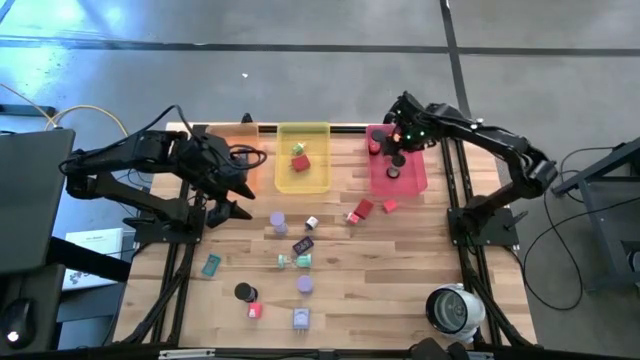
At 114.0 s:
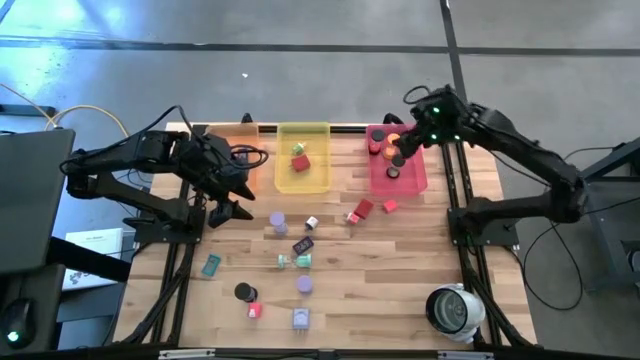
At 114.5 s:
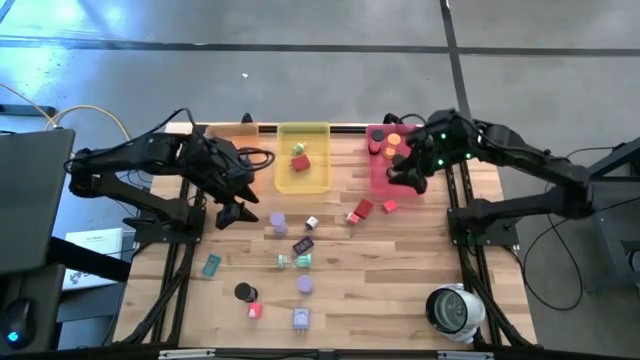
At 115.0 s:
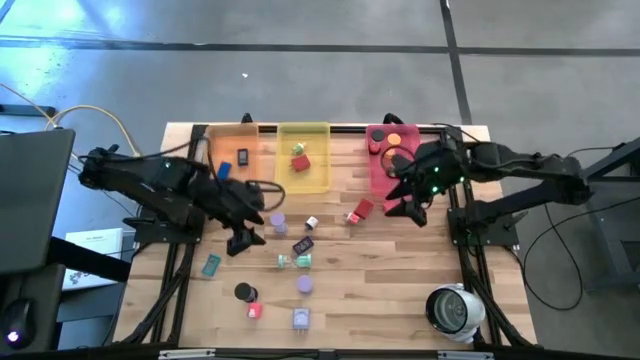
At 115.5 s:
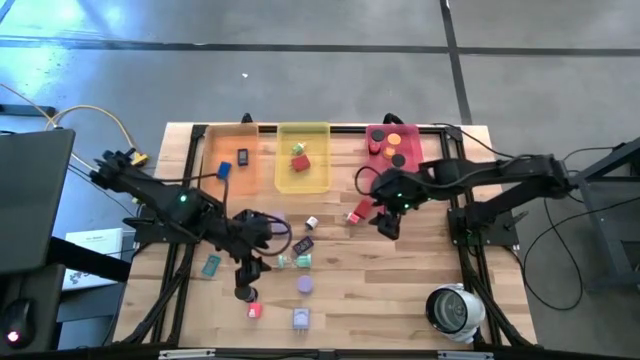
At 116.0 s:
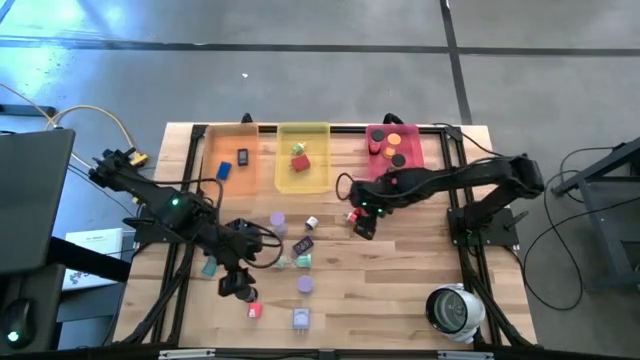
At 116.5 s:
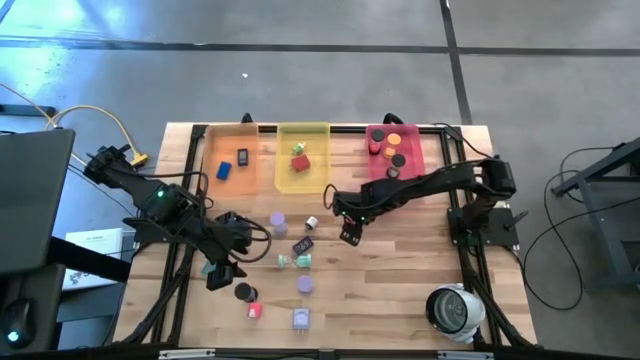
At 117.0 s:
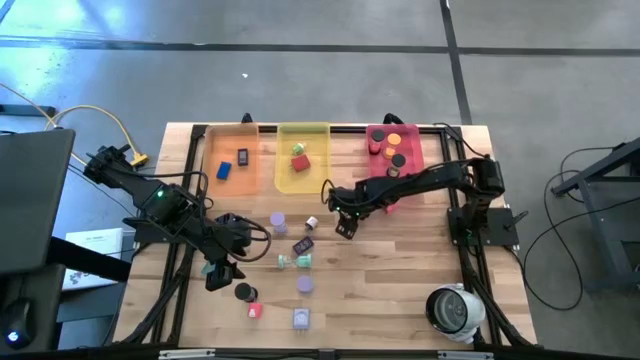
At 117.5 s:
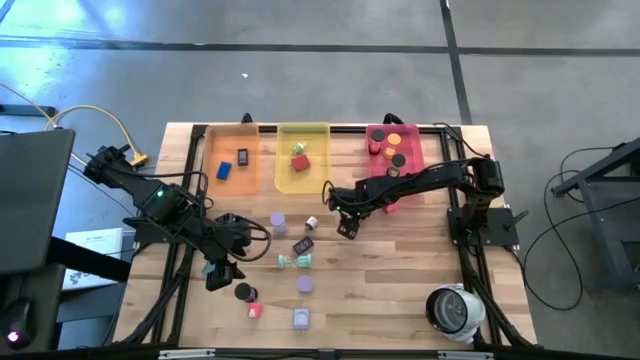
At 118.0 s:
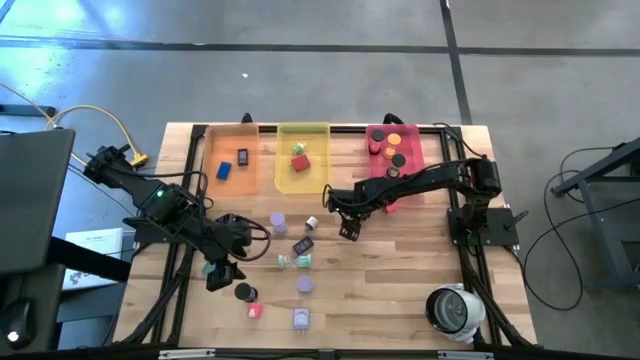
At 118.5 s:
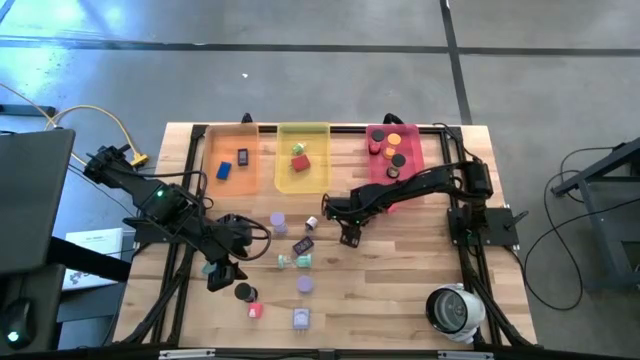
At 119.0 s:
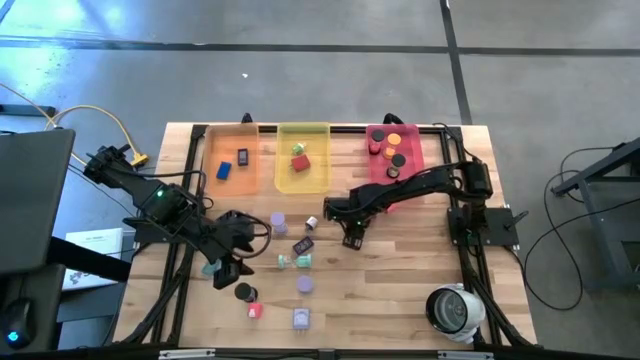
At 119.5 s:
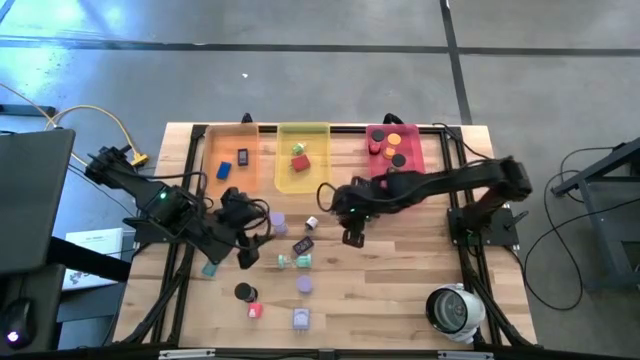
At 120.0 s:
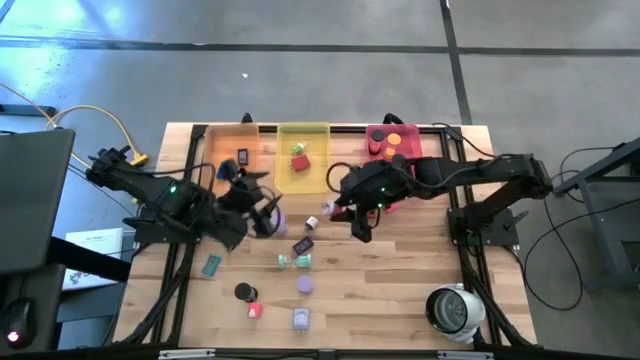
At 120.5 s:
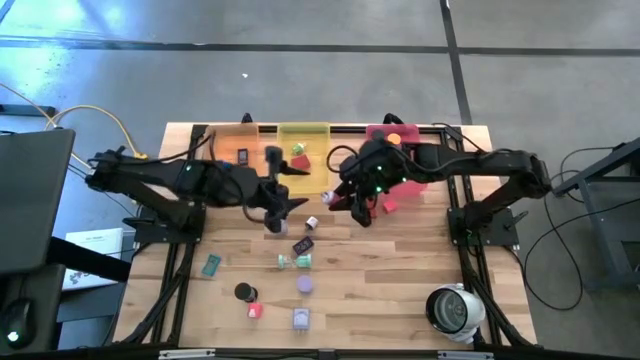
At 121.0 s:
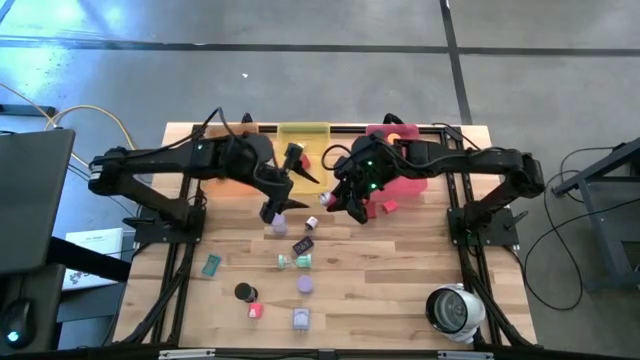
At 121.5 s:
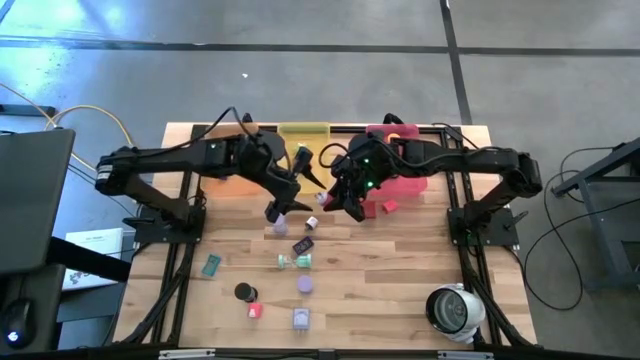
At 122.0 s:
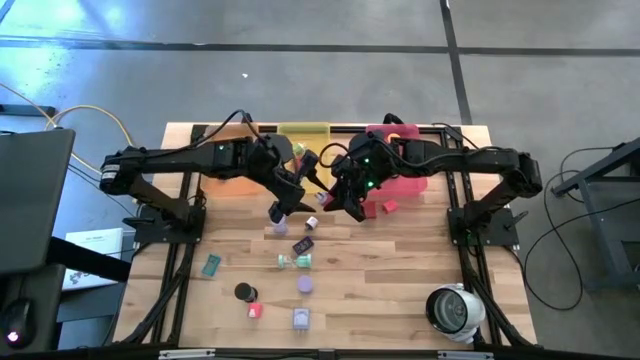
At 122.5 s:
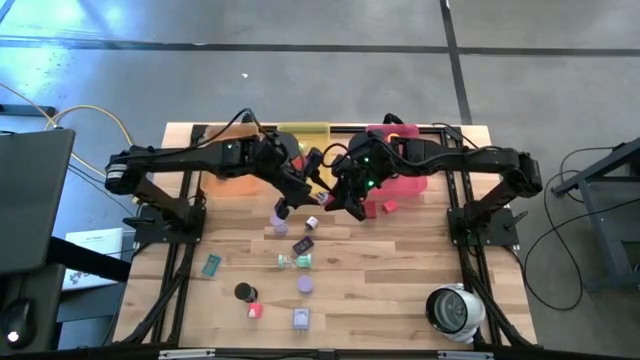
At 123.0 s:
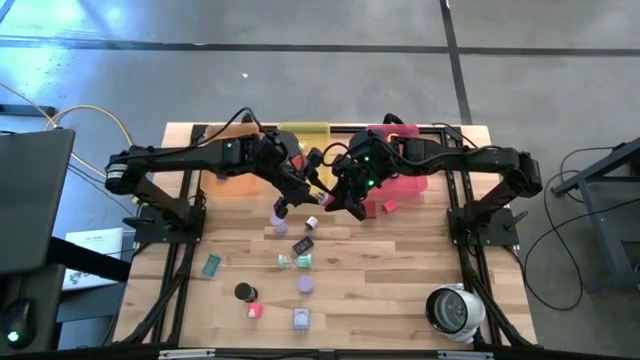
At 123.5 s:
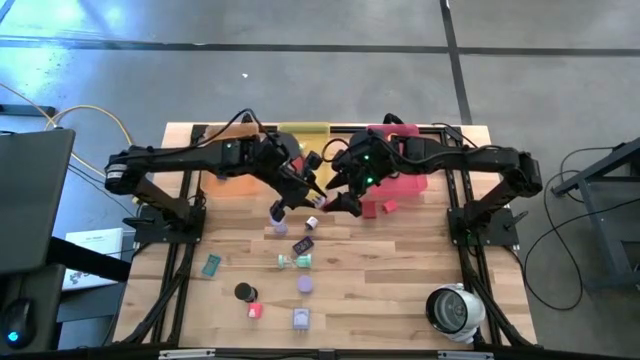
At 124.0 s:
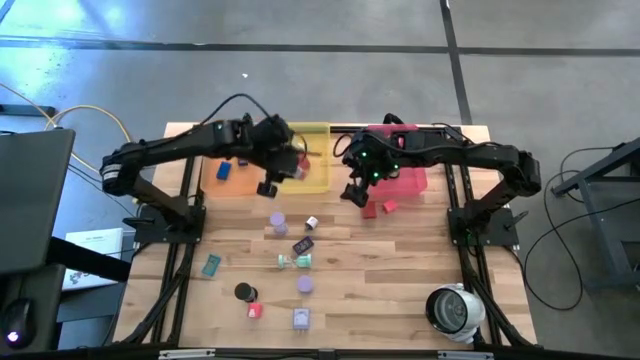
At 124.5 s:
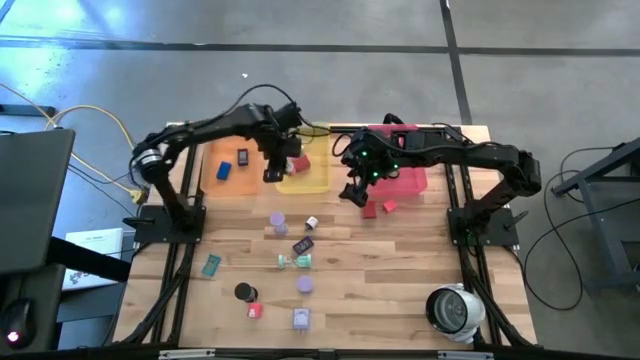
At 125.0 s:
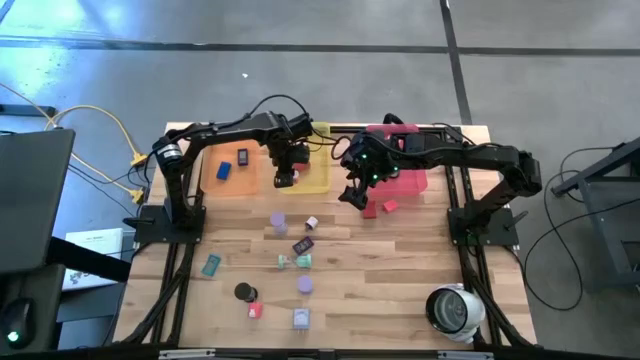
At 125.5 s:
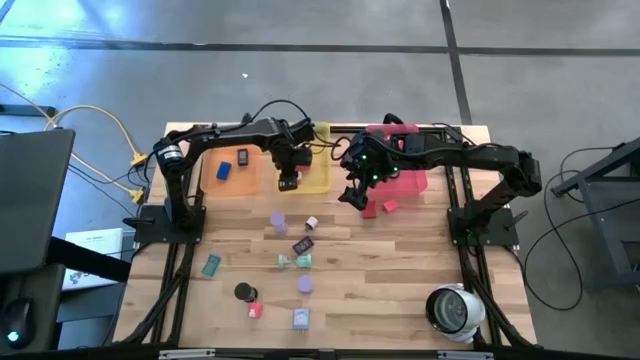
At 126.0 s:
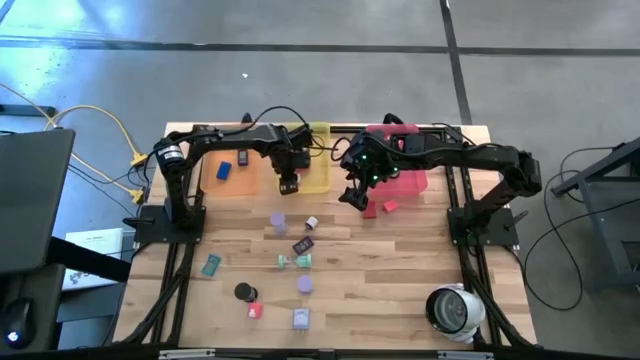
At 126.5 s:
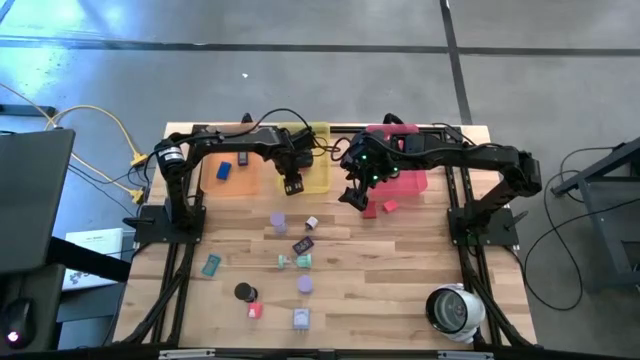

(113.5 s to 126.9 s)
Task: Pick & Place Office items
Put the pink charger adapter into the yellow bin

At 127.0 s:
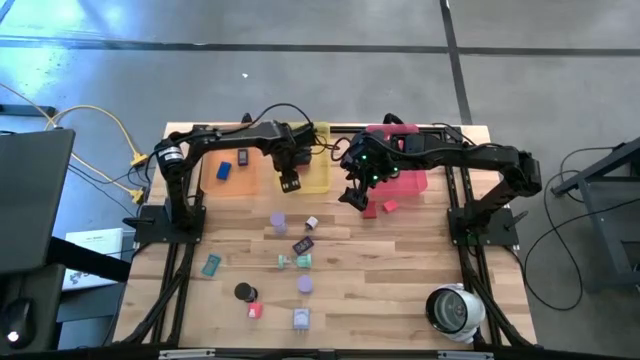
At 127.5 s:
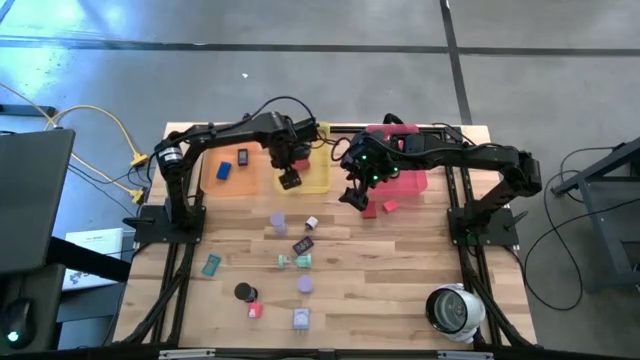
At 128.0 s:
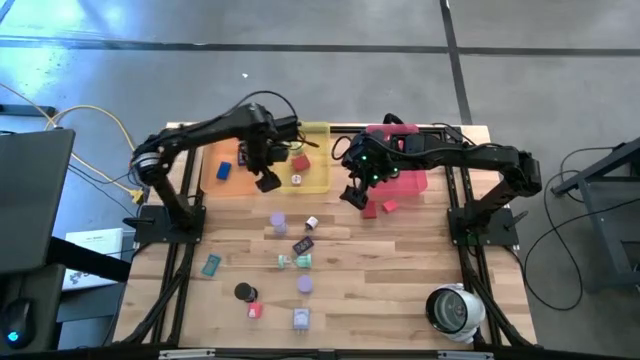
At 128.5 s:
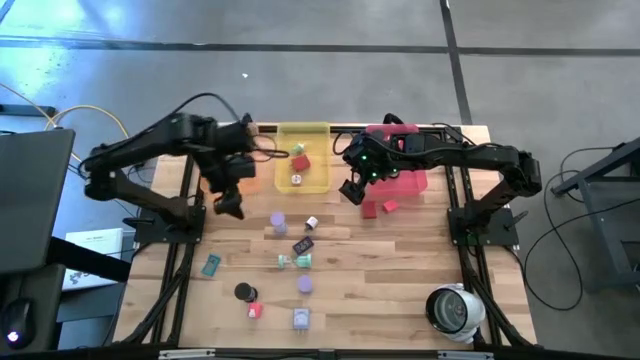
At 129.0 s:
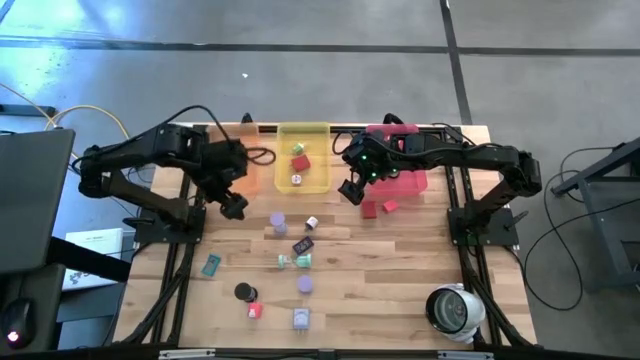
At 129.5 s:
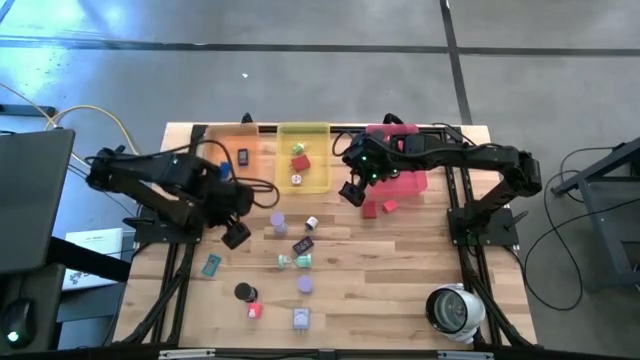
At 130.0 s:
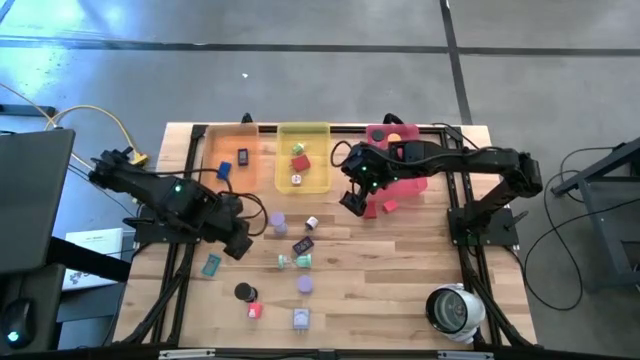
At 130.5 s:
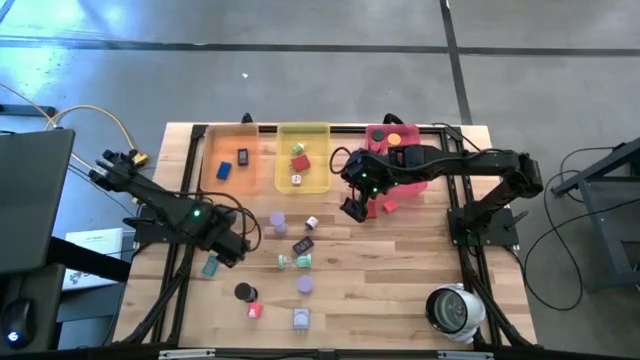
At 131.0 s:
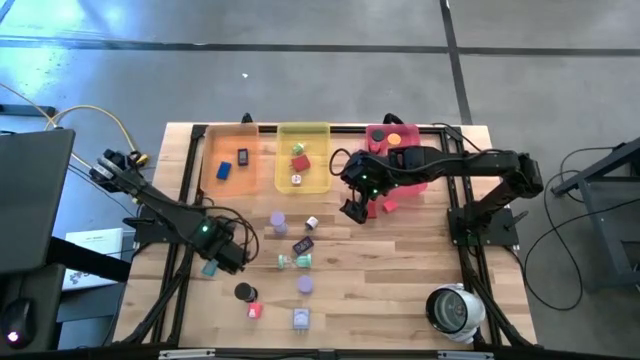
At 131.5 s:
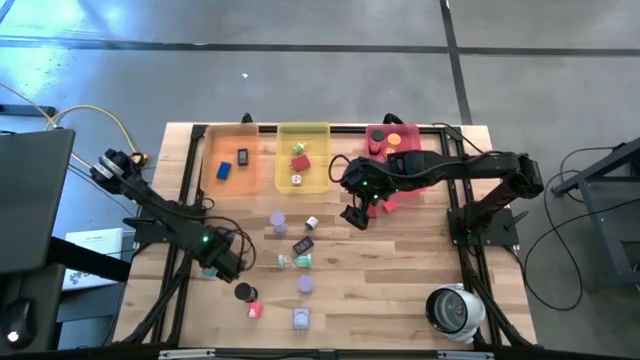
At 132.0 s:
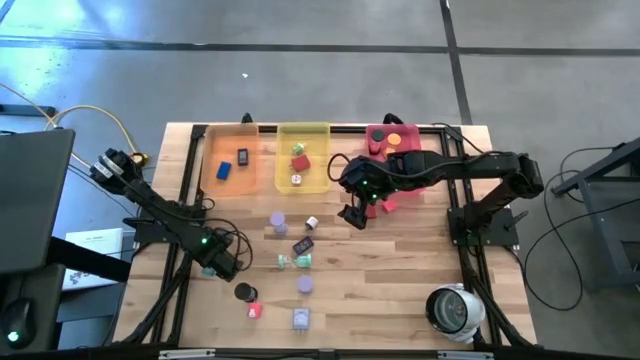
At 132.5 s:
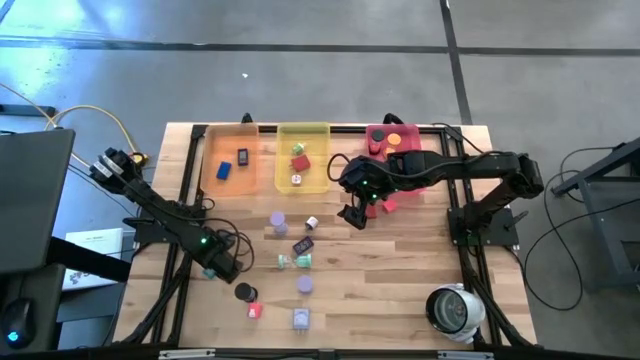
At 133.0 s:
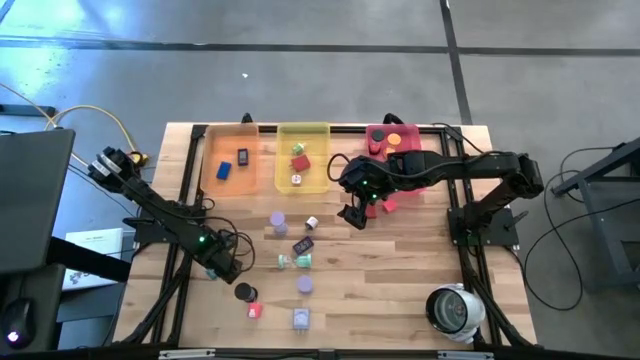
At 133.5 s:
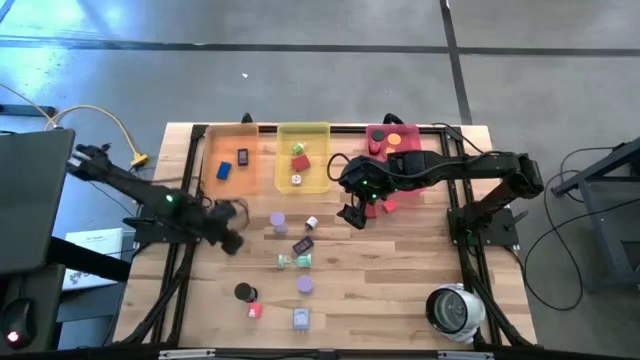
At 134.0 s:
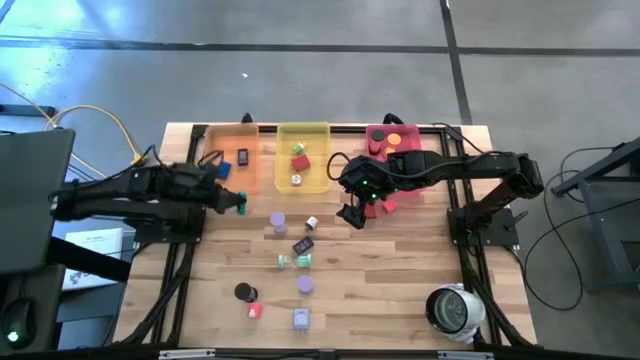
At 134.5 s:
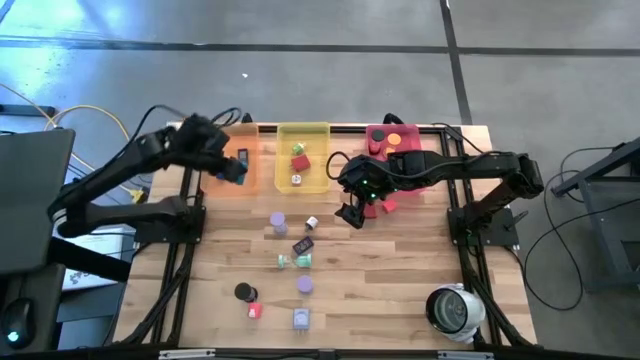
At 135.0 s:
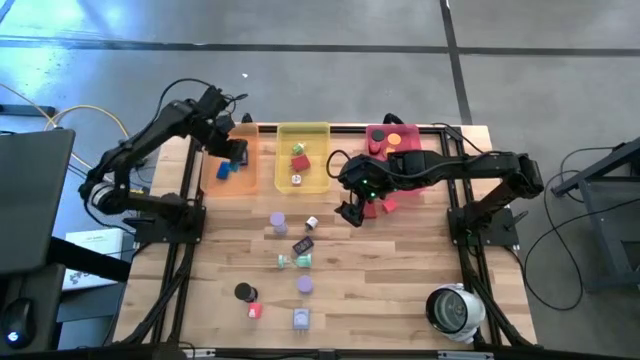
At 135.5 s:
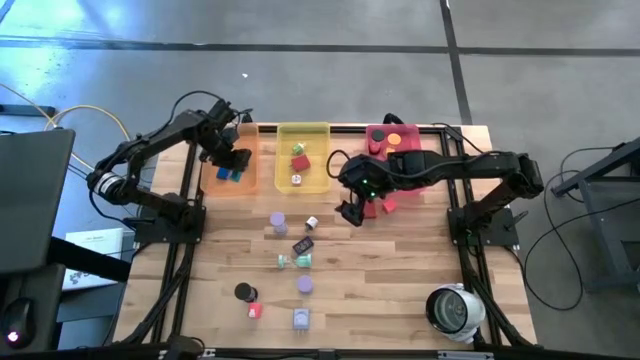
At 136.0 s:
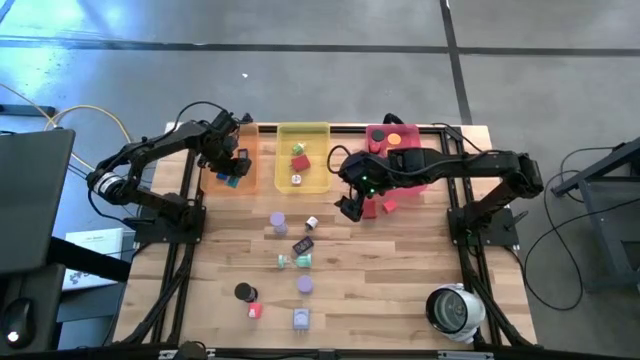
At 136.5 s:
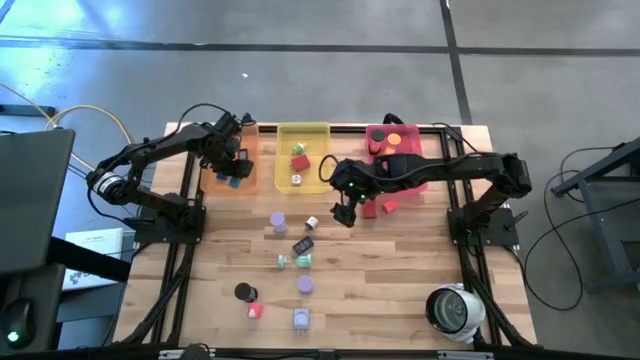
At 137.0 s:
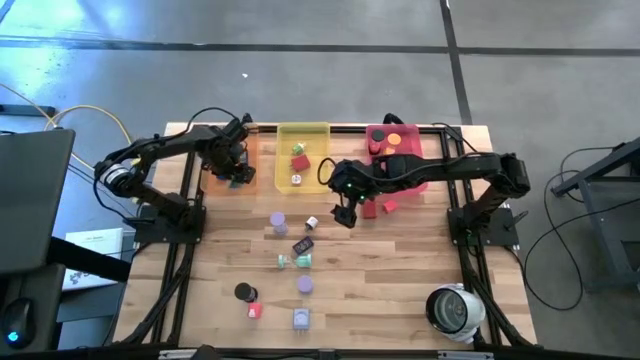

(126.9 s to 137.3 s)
Put the light blue digital clock into the orange bin
